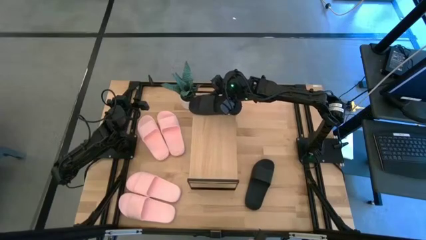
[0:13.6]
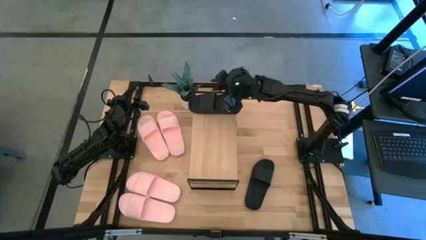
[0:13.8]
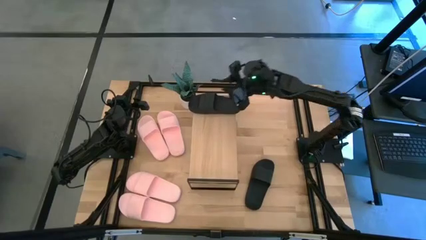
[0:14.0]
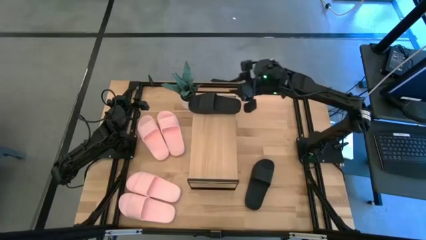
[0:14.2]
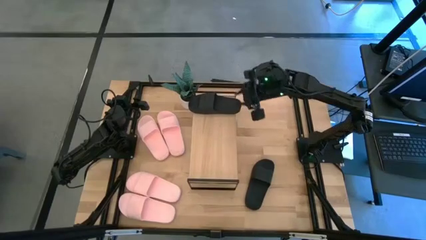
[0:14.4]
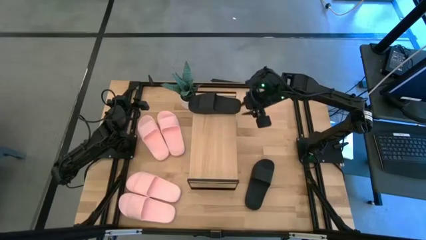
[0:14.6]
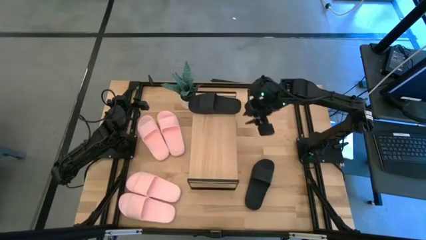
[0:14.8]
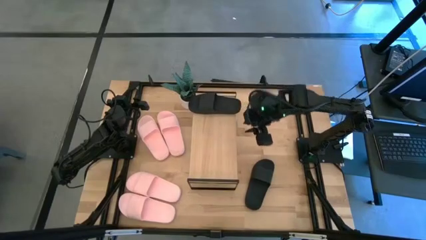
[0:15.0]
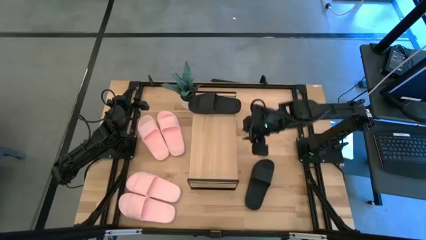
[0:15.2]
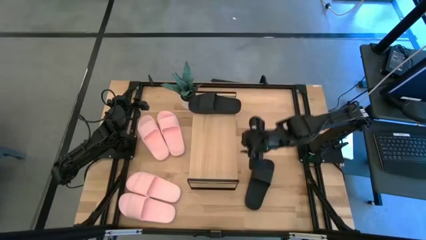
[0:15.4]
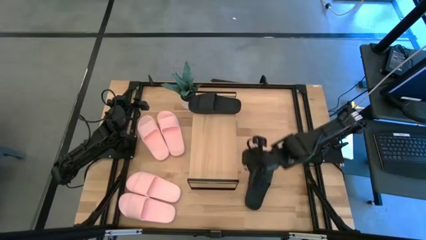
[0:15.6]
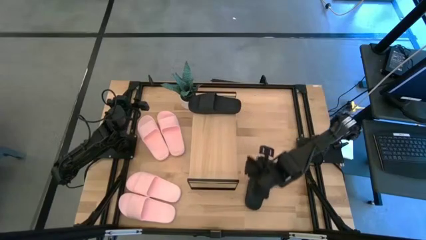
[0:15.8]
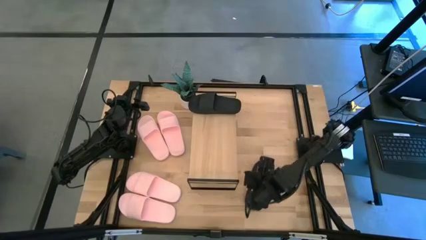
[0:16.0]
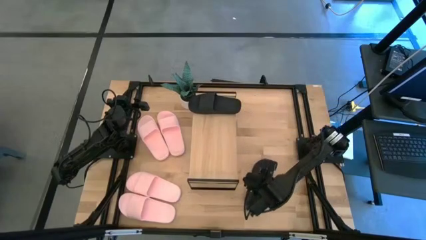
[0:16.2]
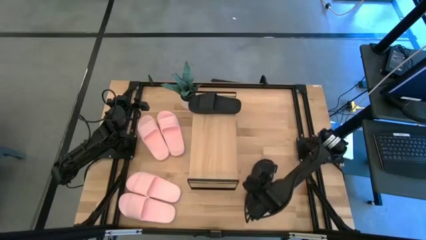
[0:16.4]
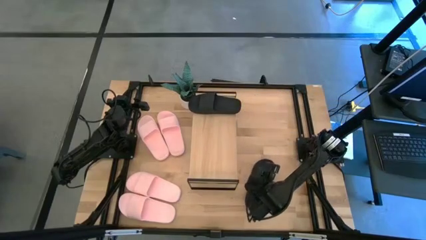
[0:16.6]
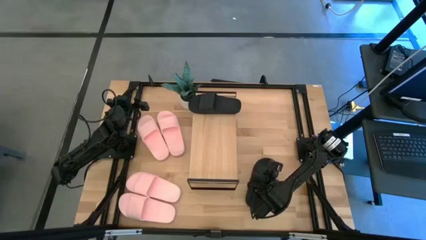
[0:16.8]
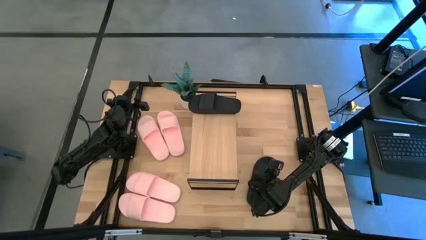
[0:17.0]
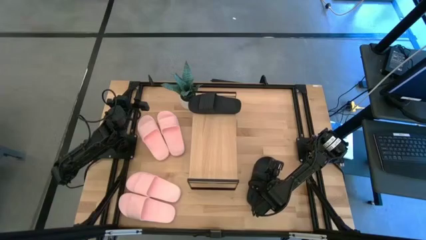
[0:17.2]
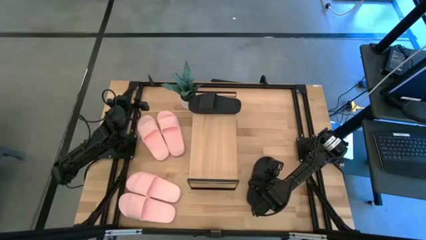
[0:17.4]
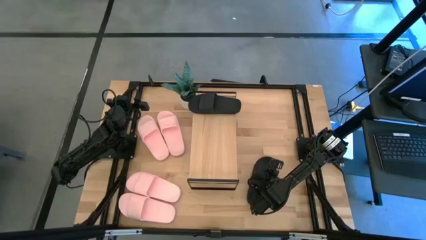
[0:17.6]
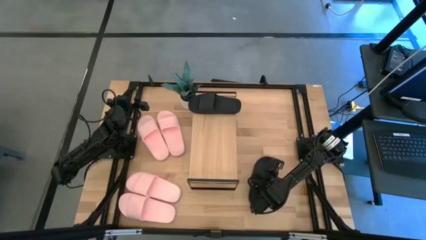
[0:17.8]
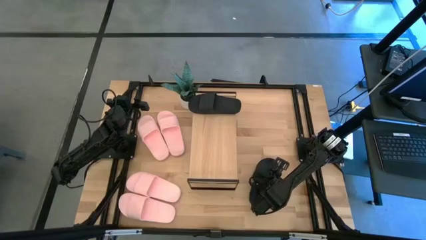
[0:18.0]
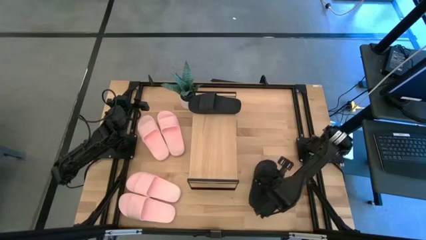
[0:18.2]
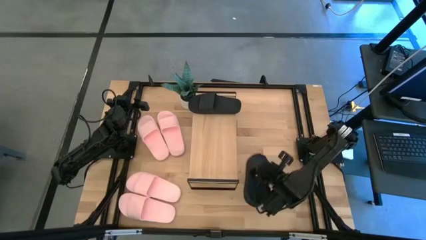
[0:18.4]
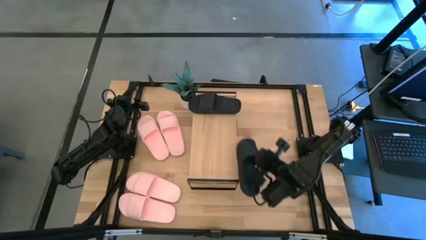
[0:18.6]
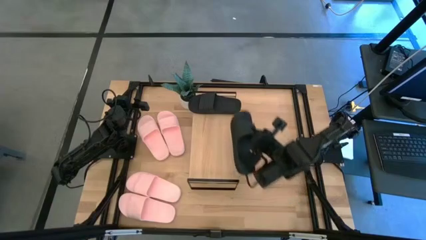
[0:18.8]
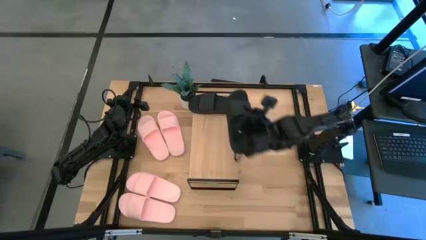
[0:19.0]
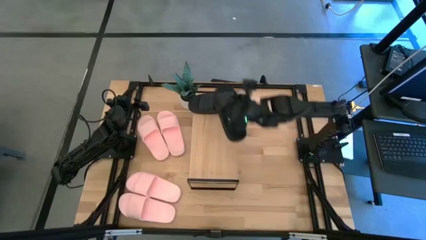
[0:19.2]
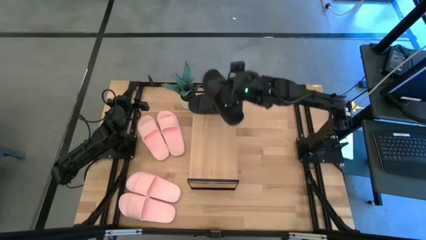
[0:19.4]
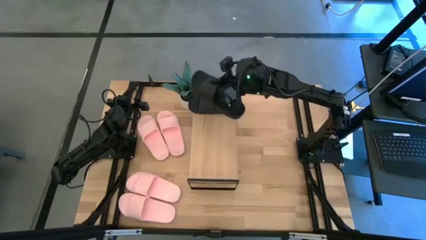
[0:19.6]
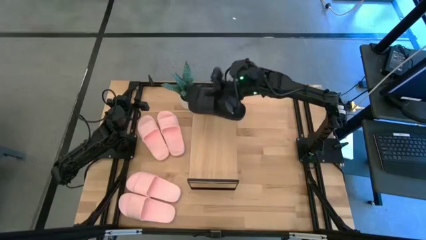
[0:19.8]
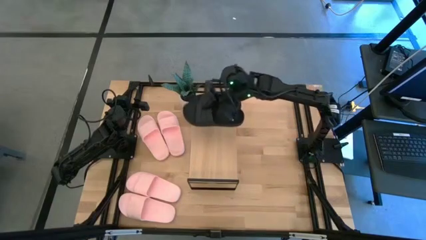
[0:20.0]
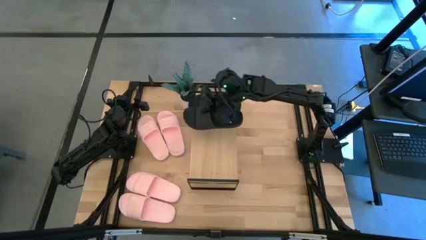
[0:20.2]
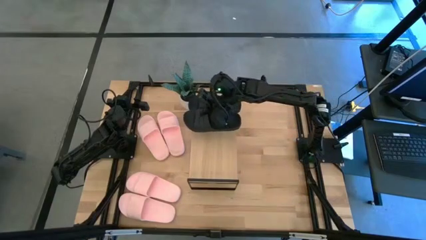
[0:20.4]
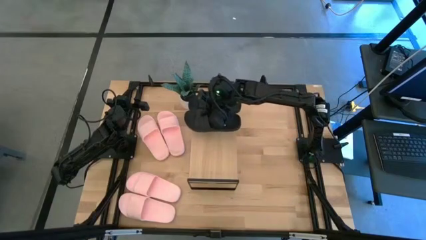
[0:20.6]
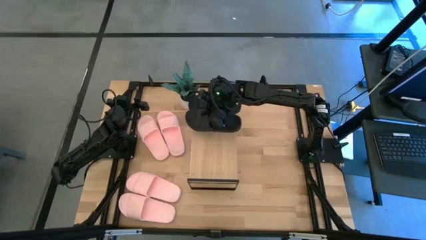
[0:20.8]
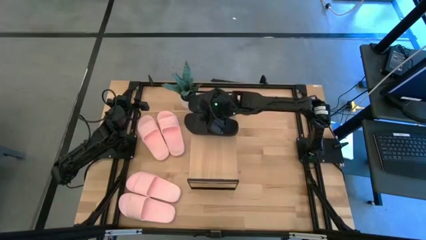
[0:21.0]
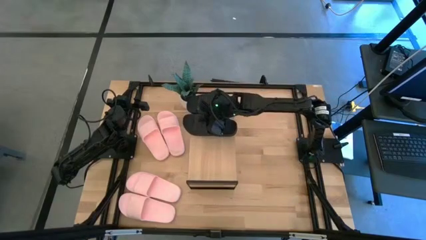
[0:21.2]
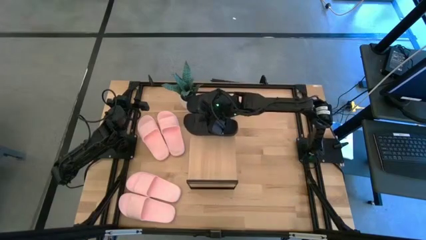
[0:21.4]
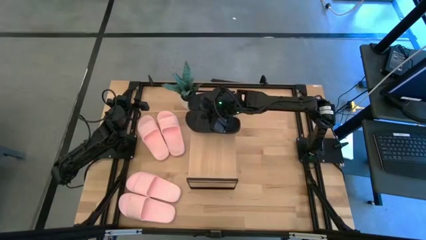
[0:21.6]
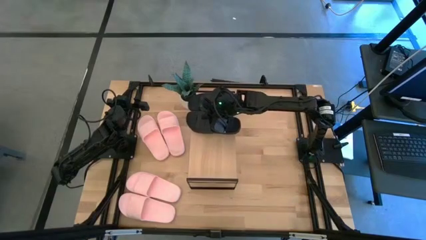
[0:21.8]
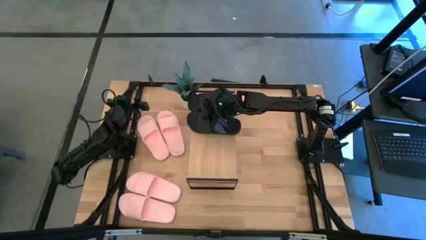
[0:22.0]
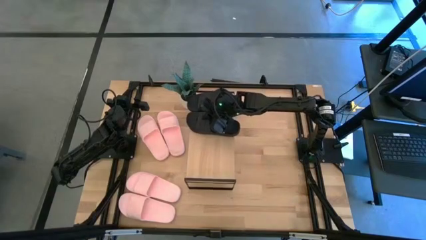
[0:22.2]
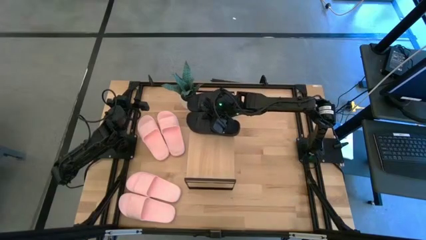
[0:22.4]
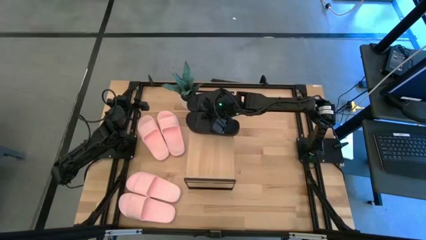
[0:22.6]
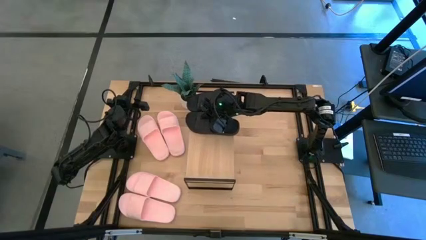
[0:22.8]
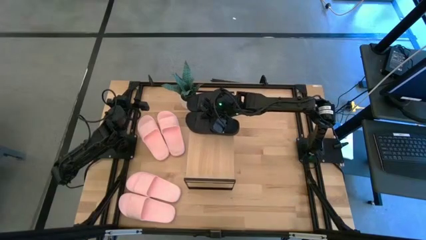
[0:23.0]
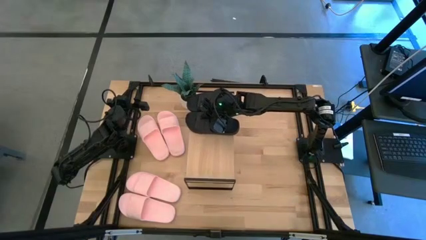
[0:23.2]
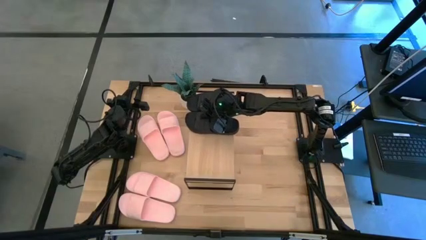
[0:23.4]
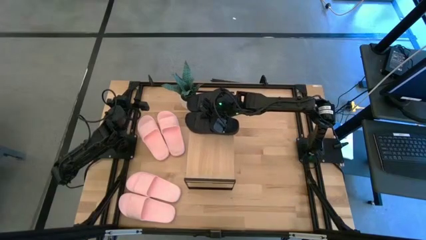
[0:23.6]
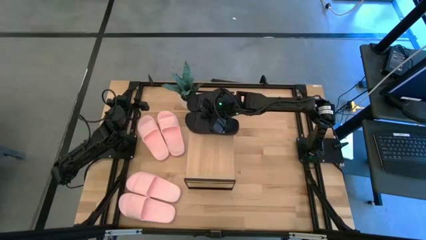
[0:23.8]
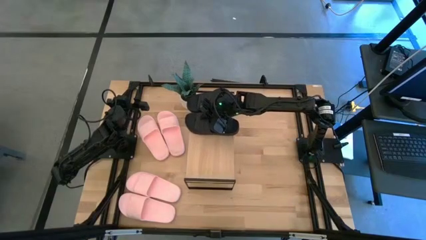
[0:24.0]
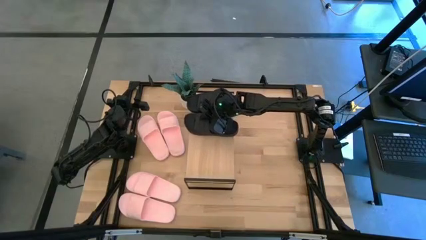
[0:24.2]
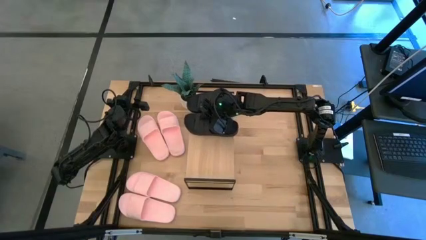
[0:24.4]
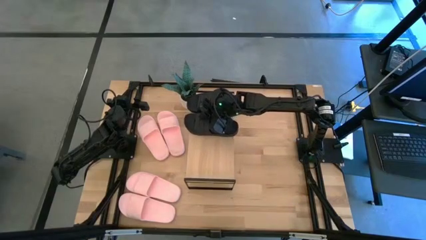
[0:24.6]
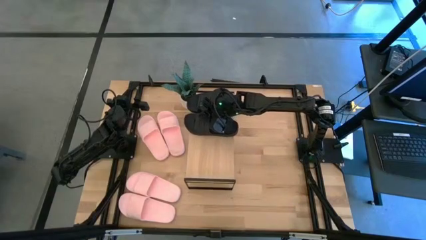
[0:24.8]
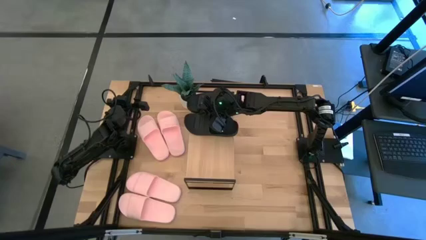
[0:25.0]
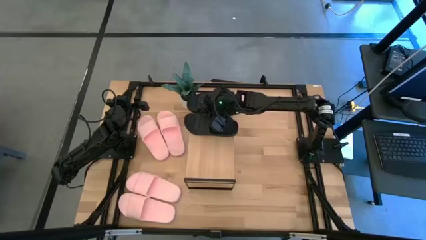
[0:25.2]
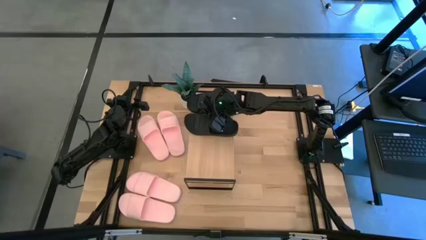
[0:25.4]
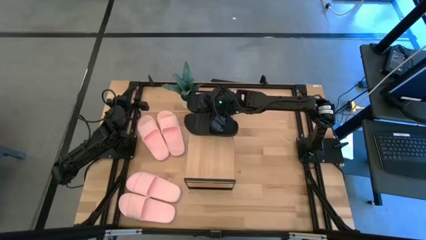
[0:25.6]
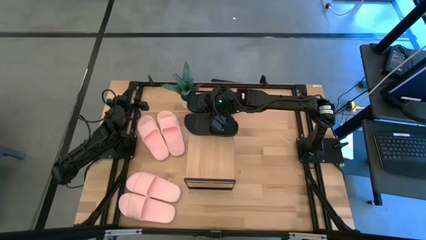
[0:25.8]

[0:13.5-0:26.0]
Task: Pick and place slides into the shelf
Put the black slide on the shelf

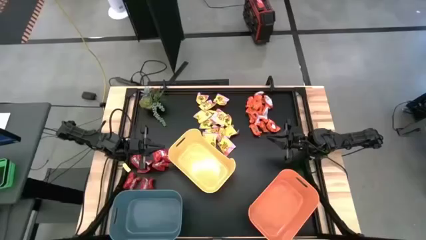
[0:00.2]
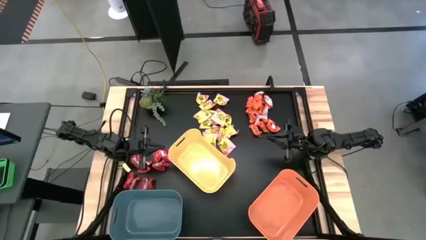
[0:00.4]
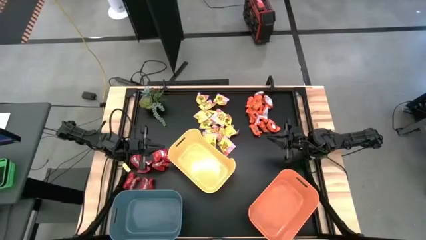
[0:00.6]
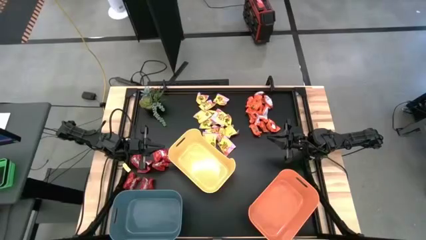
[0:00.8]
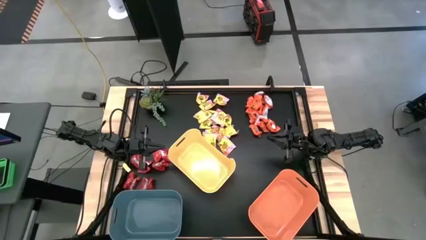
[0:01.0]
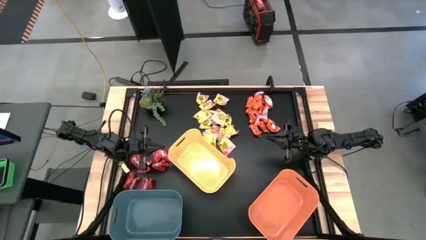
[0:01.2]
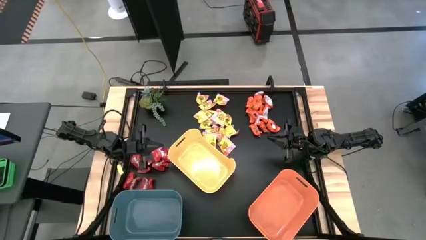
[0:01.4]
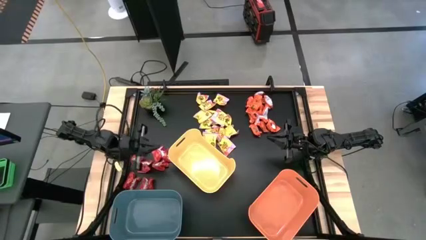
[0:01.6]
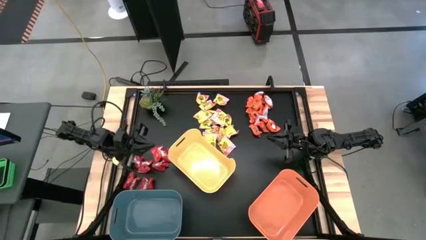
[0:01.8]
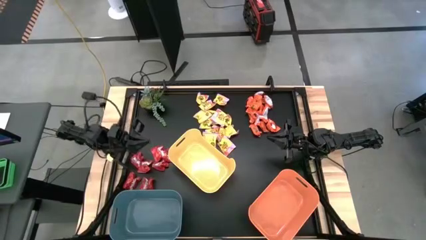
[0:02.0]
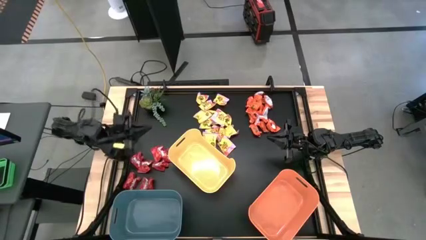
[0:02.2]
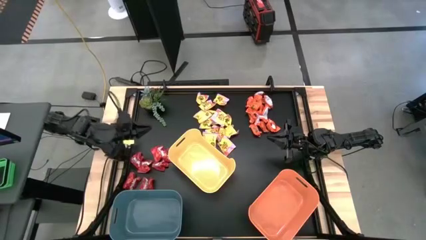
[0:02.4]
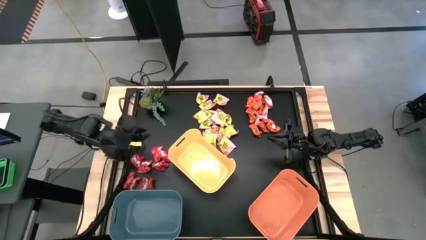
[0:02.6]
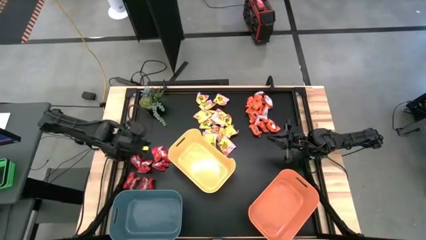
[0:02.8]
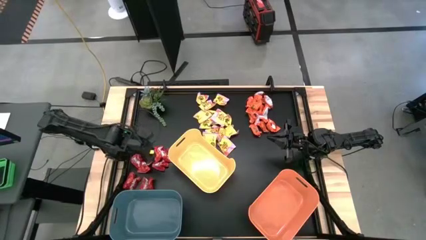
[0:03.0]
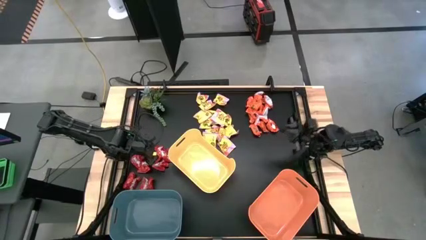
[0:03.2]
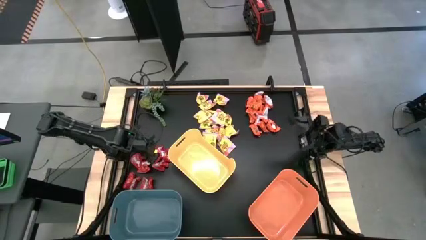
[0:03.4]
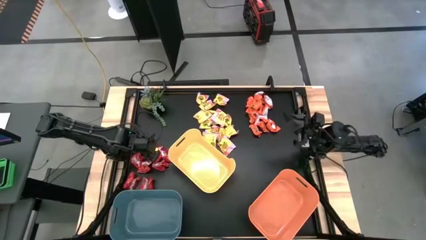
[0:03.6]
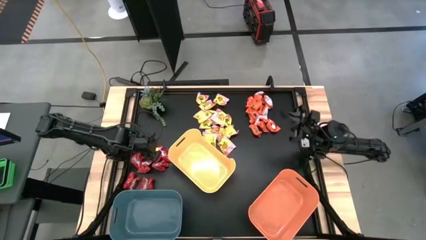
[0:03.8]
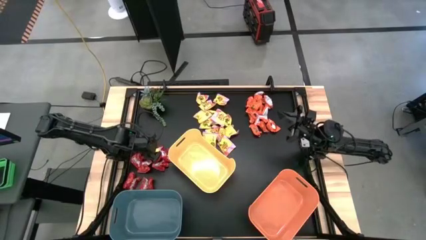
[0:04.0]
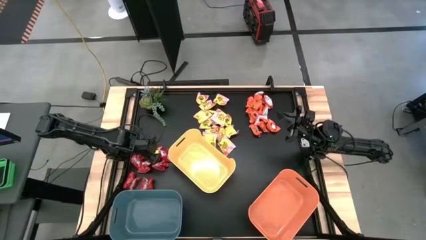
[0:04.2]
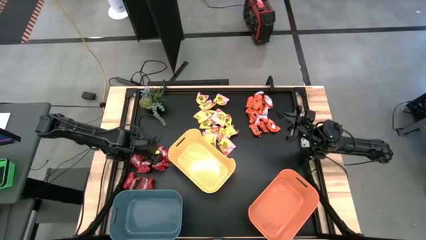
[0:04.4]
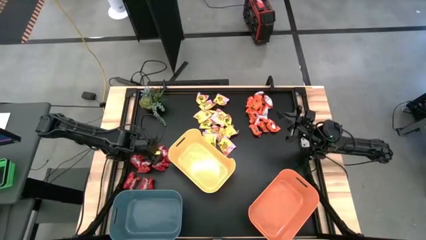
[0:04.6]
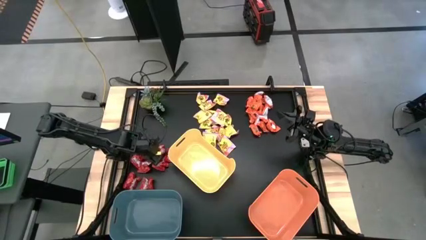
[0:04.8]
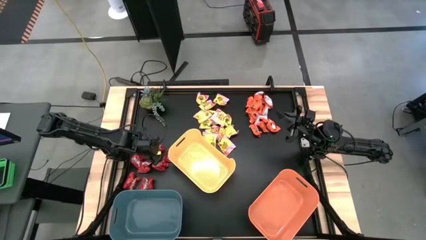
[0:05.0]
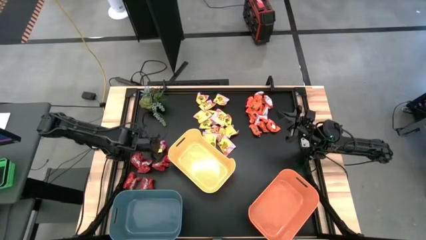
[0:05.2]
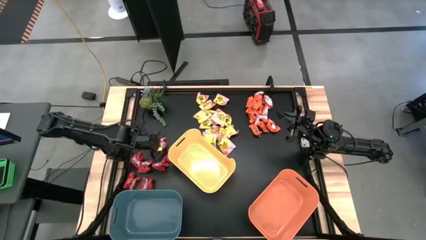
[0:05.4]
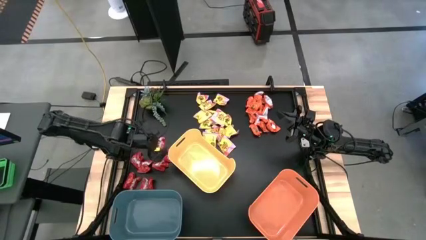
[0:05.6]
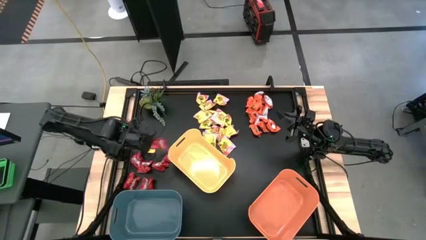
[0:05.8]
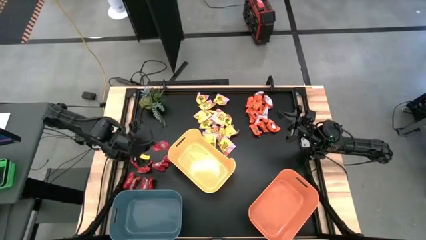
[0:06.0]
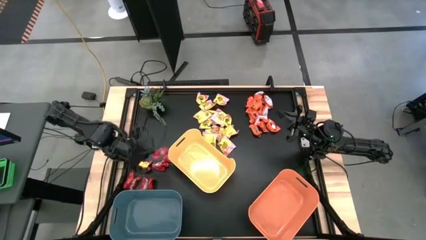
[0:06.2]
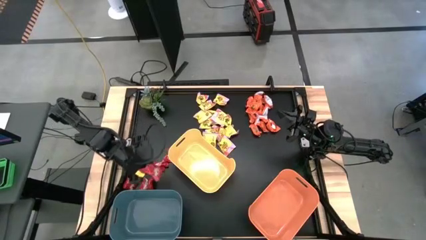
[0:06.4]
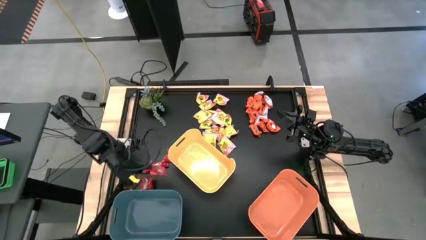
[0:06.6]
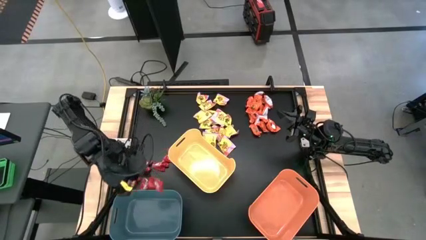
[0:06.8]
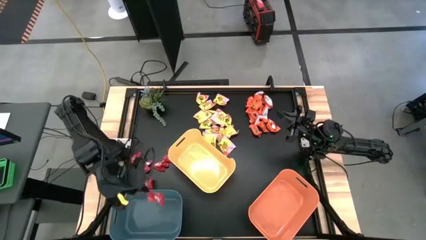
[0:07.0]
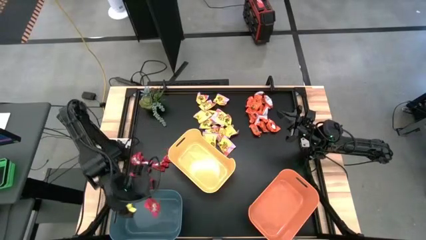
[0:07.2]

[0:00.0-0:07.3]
Task: Sort candy
Put the red candy into the blue bin
